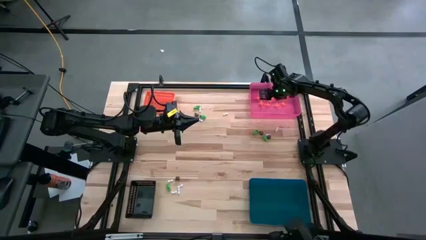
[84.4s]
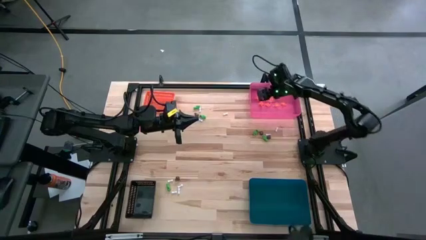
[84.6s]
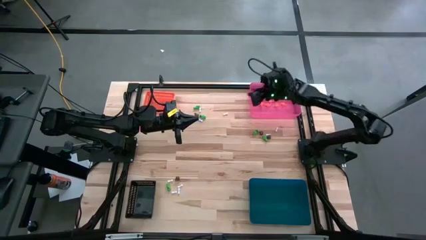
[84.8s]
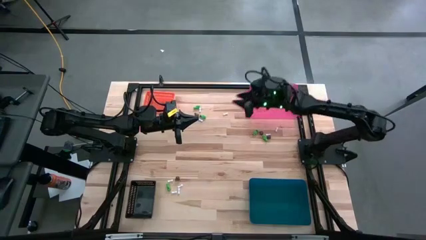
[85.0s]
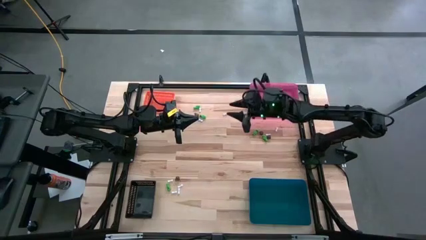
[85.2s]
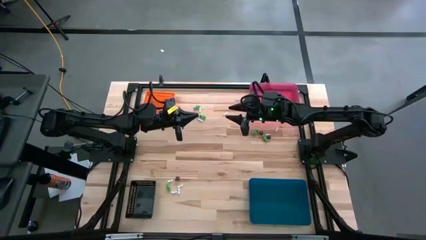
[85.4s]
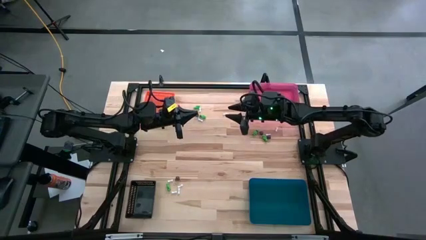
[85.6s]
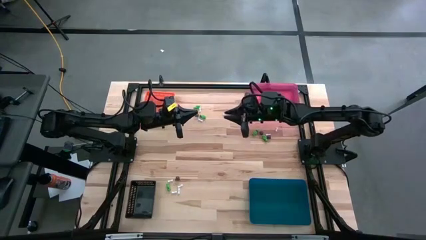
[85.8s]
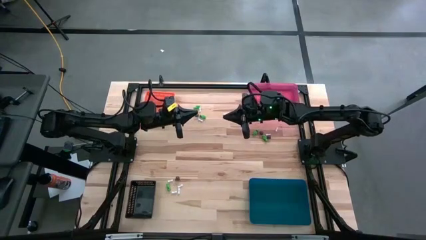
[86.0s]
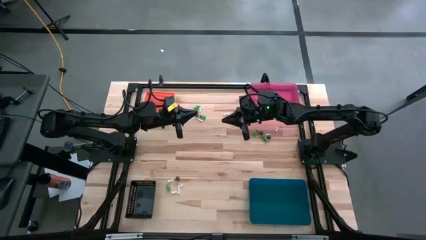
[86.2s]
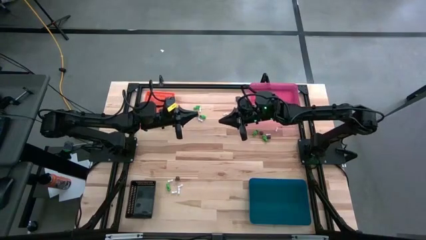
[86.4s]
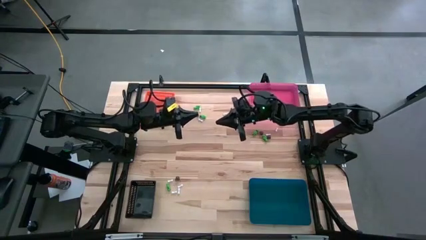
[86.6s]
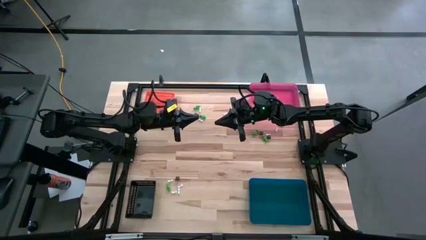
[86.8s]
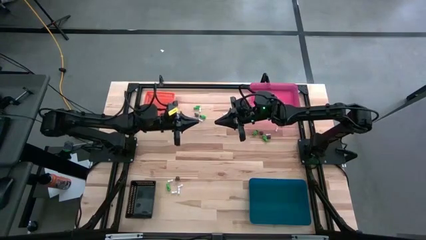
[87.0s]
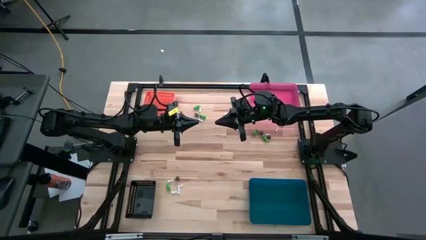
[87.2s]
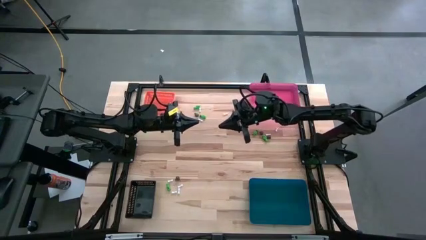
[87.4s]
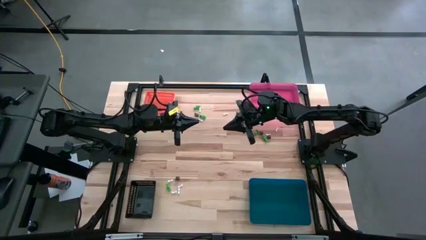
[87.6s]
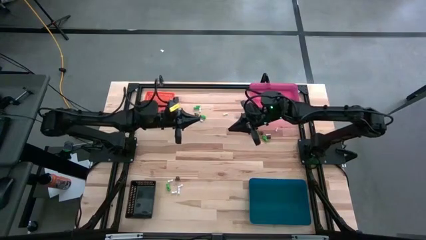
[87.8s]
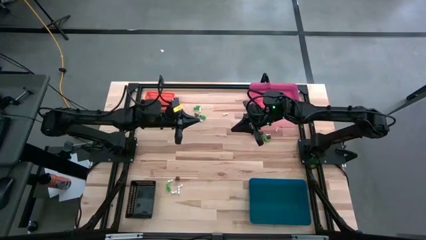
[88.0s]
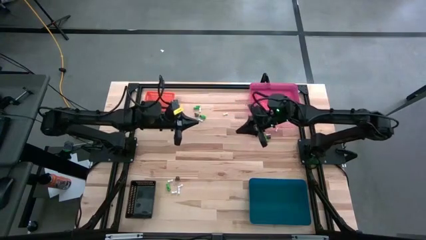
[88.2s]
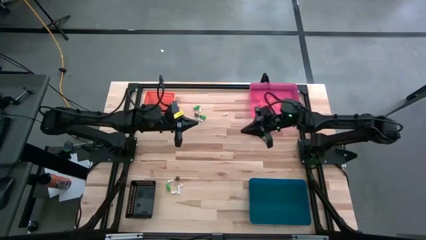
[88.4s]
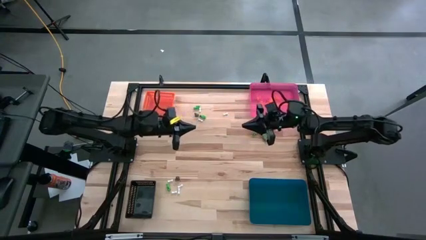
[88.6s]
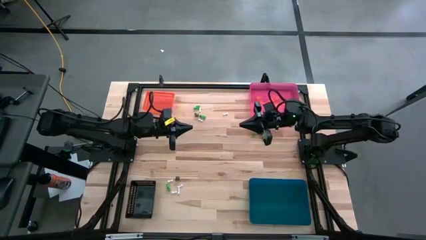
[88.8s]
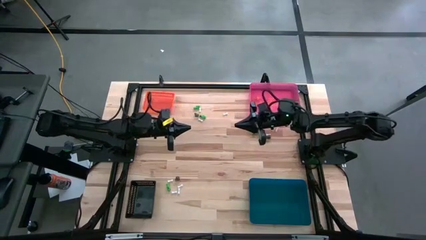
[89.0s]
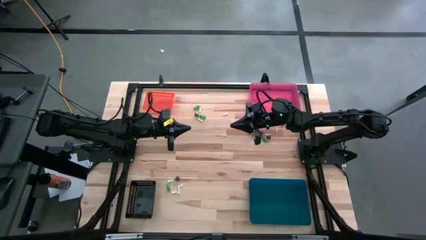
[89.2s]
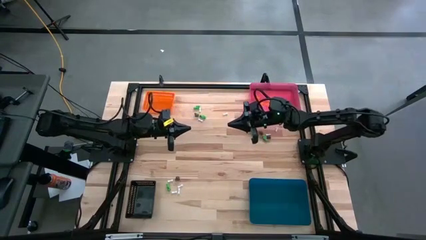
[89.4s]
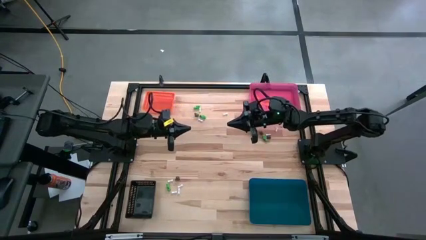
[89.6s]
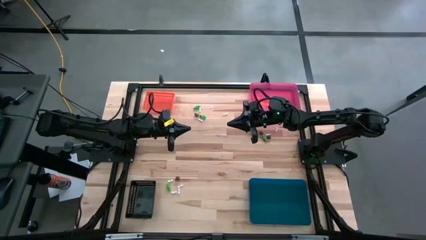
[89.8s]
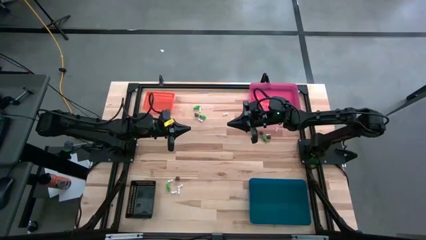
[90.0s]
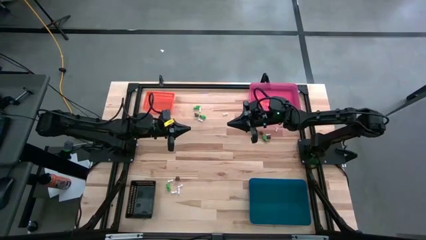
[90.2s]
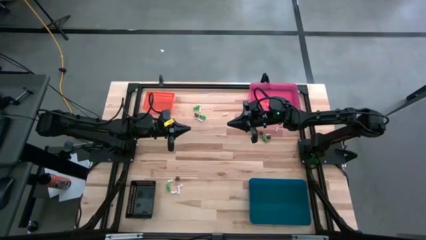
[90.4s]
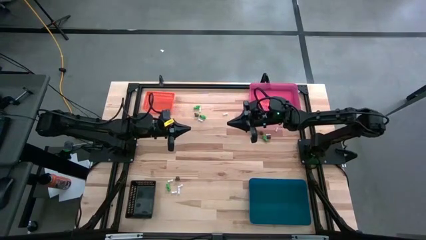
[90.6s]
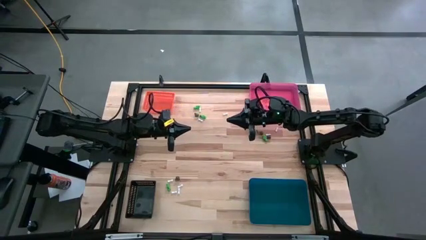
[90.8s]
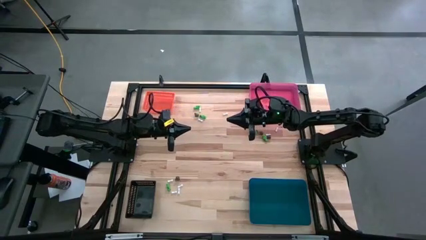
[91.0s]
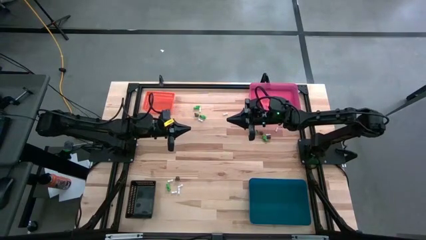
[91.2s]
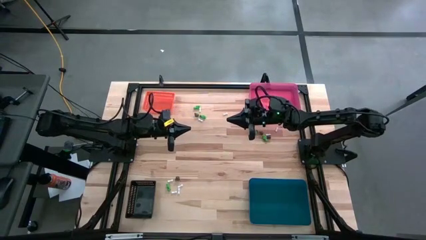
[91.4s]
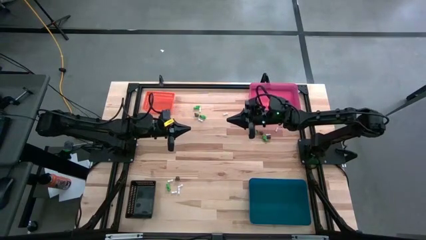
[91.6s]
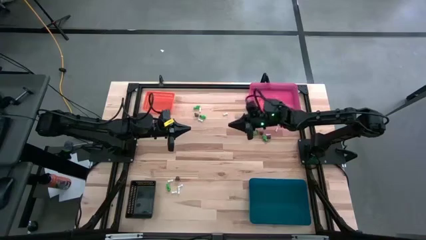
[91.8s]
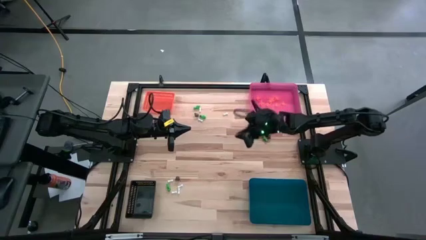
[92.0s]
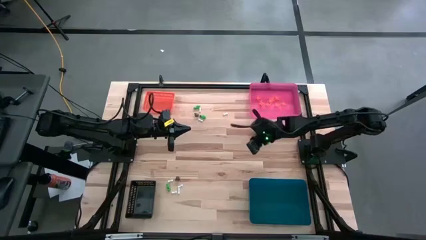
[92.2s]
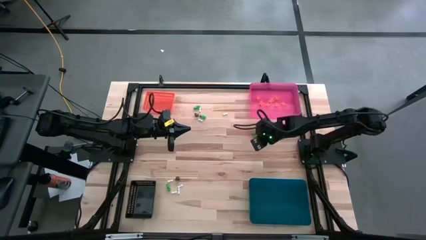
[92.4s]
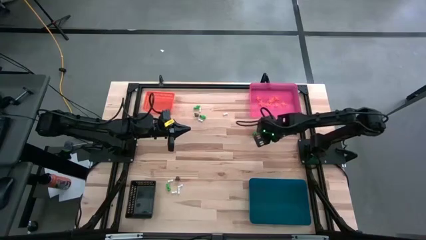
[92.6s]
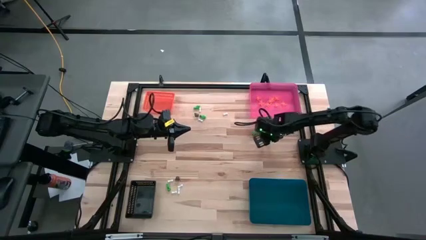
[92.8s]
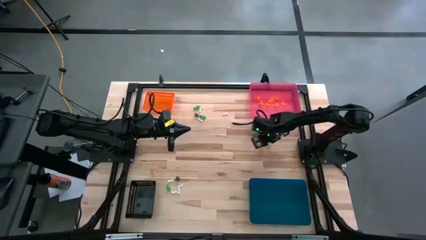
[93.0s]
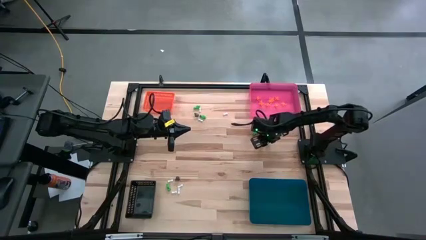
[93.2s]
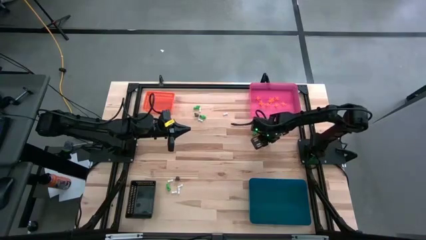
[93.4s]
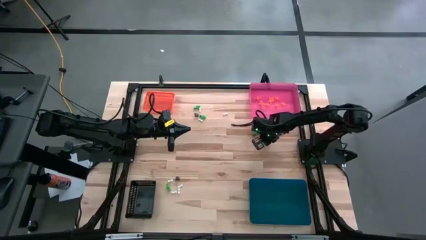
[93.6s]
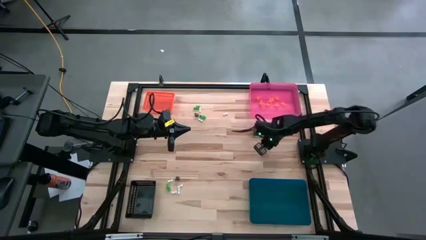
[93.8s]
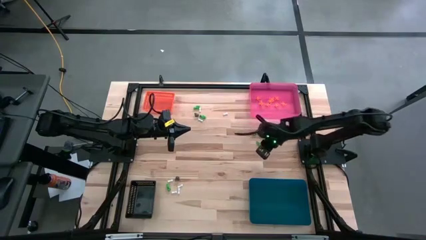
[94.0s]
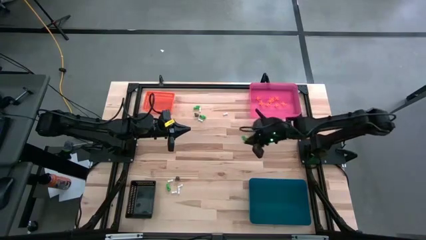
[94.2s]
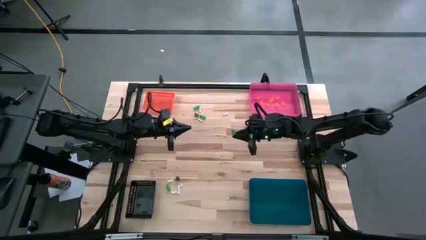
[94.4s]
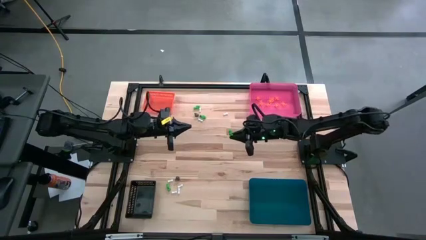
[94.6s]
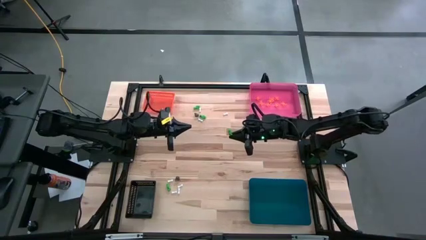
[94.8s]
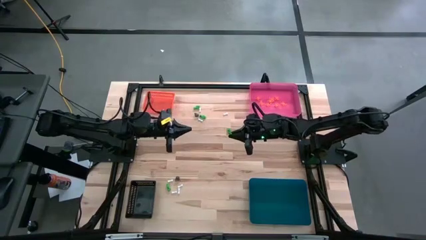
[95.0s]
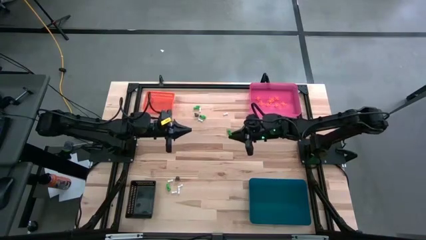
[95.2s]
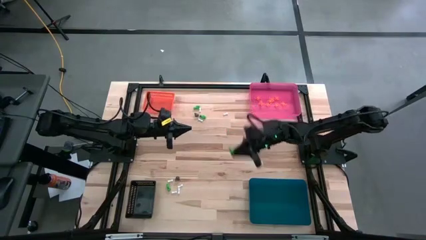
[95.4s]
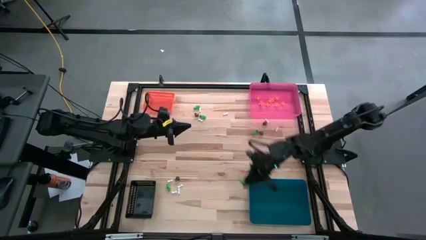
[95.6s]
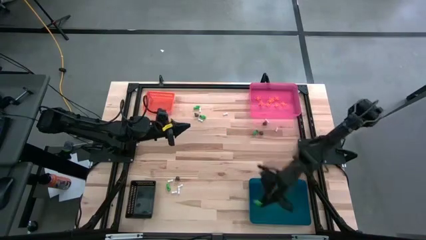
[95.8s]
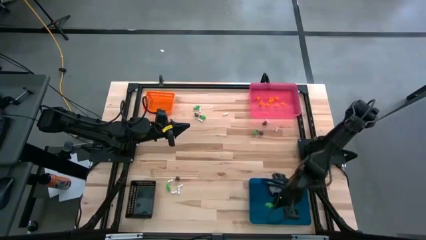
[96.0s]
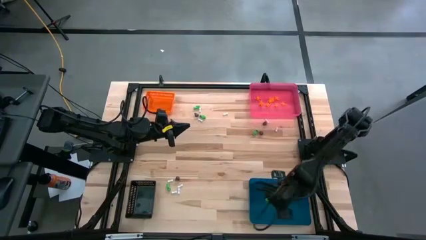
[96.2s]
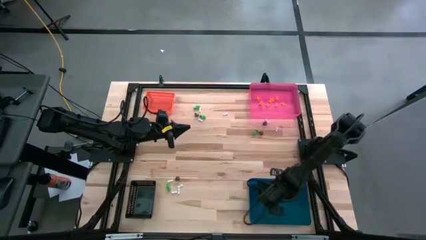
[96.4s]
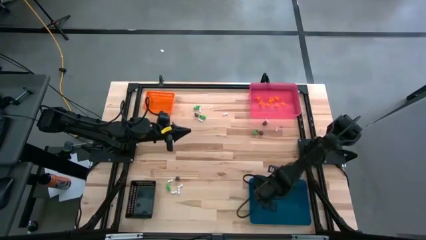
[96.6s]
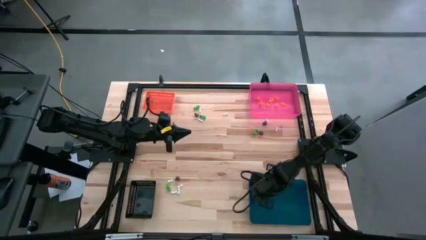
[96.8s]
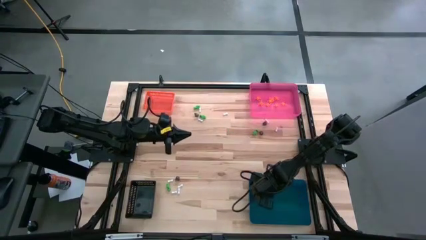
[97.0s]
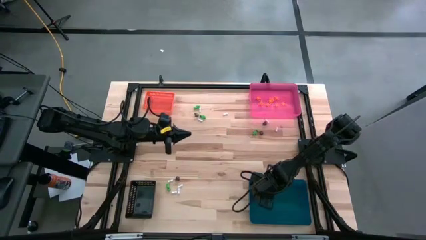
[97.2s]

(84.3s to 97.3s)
Task: Sort Halloween decoration
Put the green skeleton toy into the blue bin

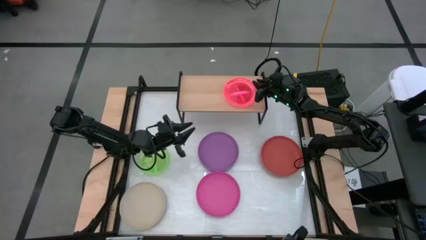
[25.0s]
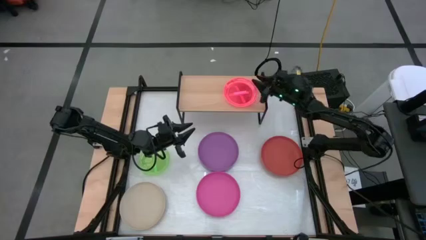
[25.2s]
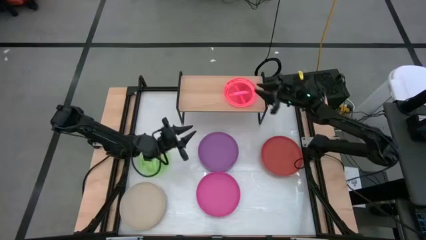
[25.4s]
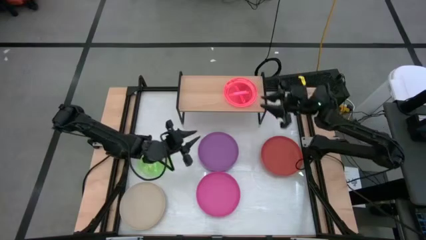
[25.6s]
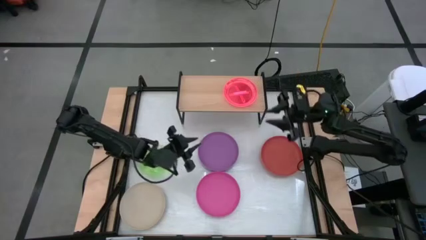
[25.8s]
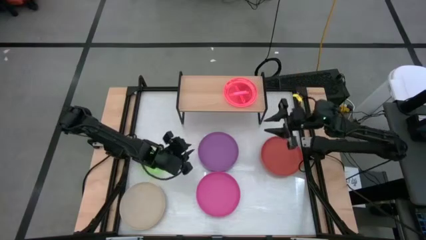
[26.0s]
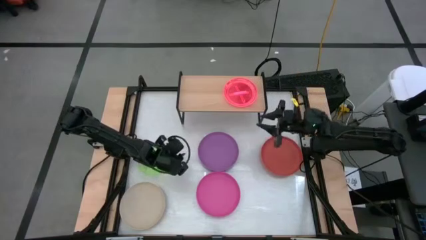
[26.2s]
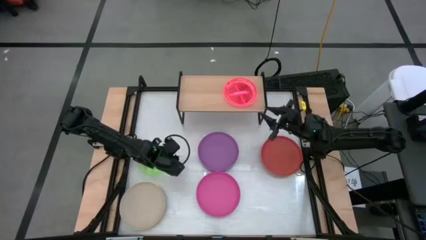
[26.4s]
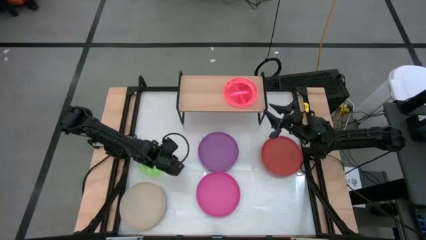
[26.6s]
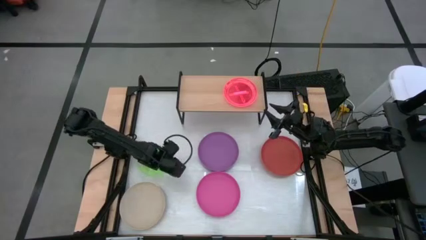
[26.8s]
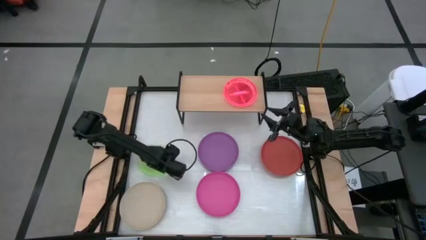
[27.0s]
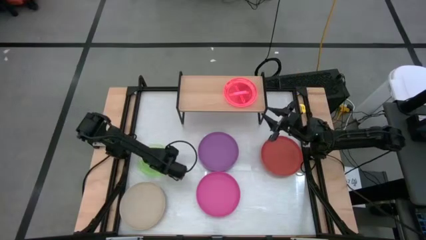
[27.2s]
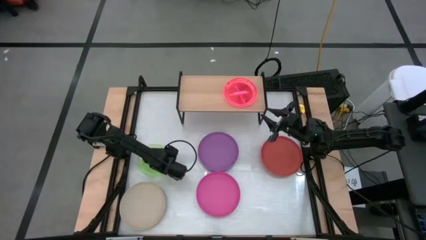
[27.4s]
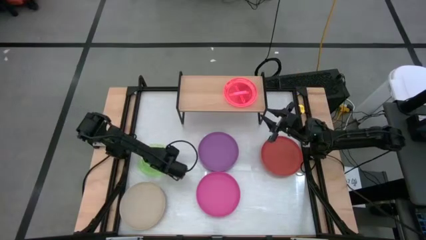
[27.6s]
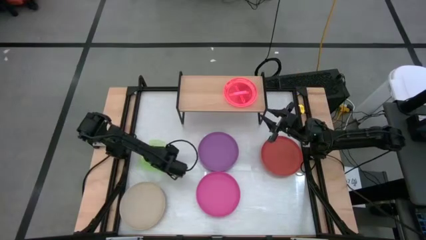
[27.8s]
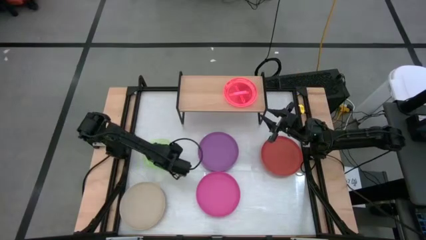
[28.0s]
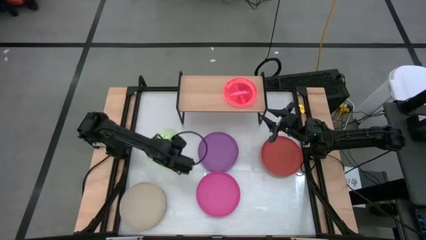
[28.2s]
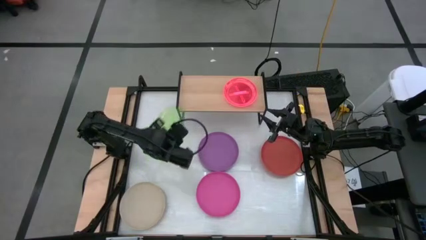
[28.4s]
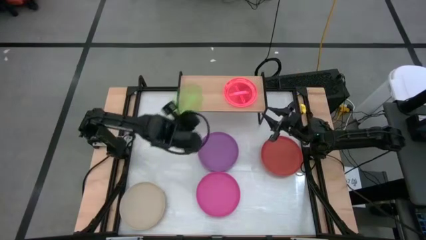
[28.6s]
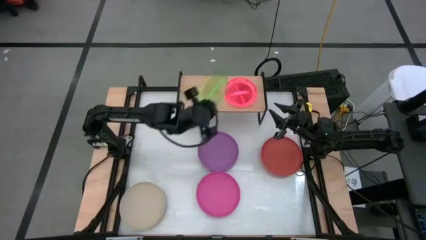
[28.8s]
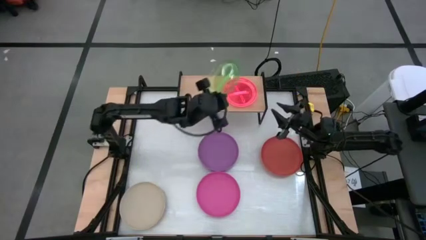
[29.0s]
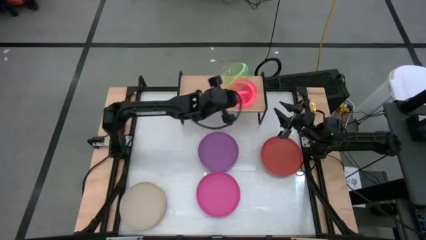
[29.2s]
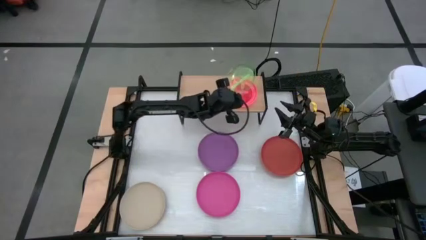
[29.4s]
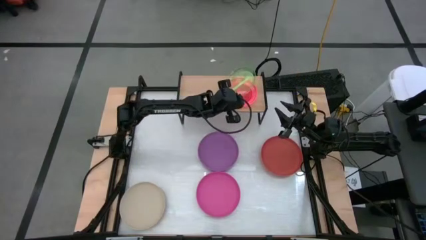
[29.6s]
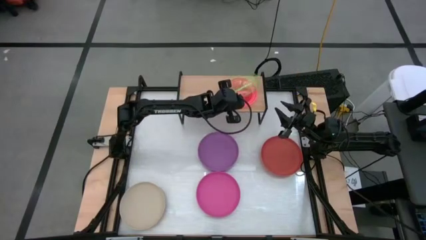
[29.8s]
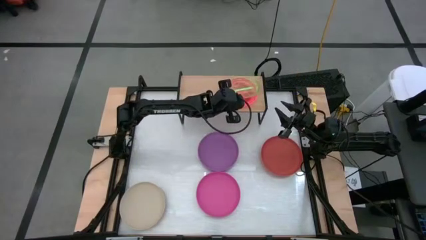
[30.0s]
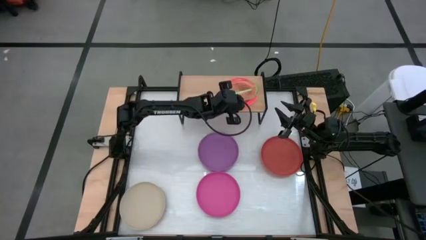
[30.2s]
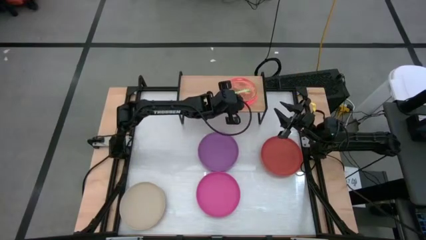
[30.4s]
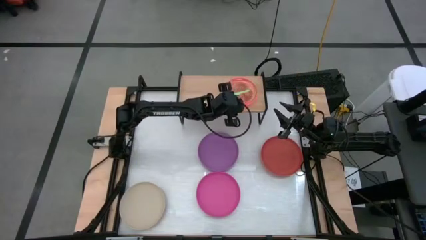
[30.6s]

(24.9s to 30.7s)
Task: Place and stack plates onto a shelf
Stack the green plate on top of the light pink plate on the shelf
